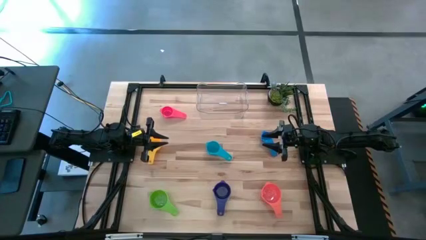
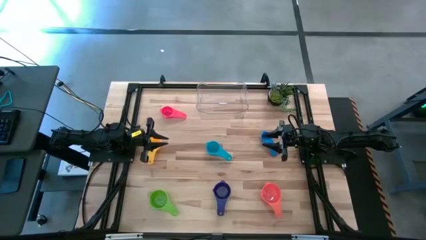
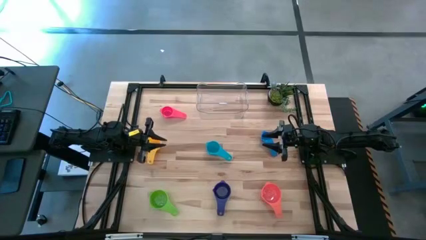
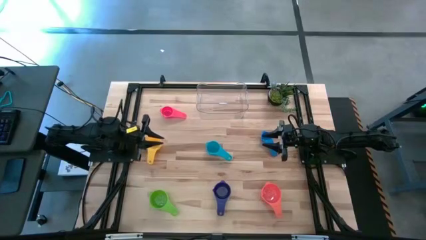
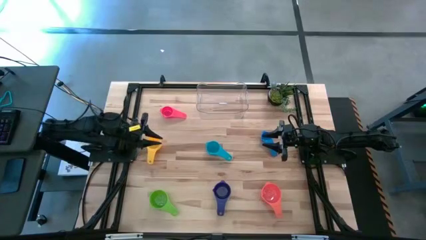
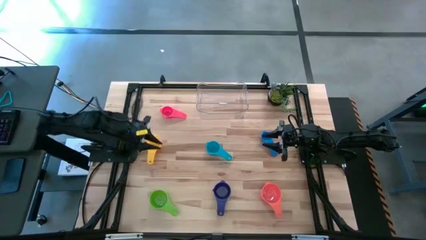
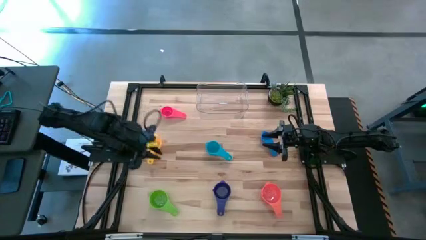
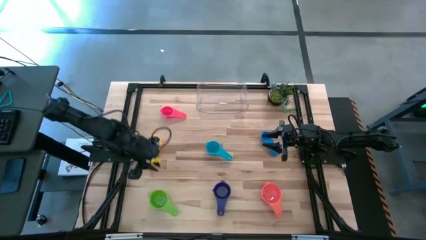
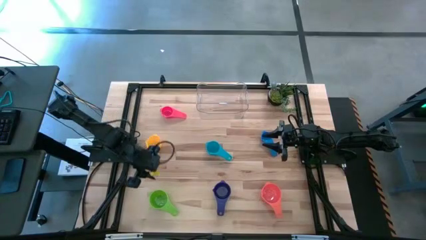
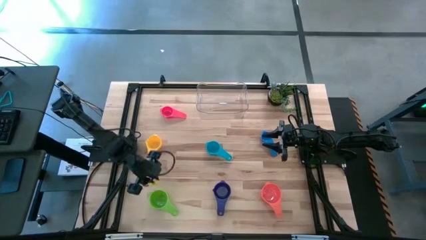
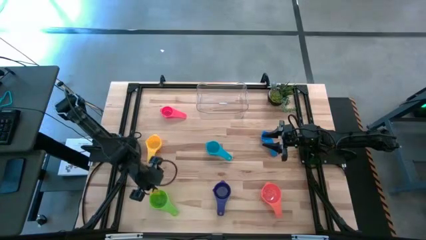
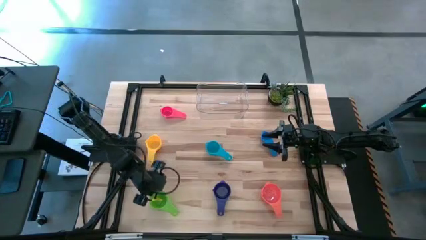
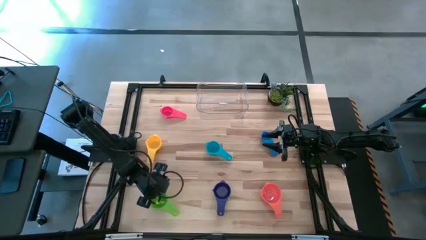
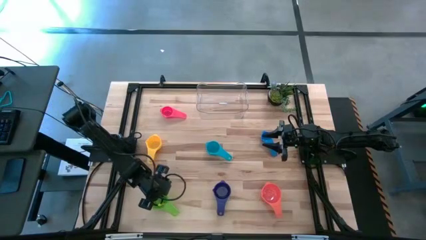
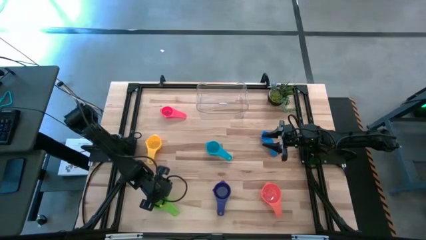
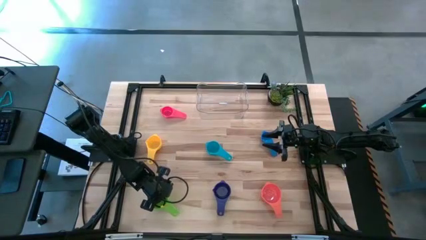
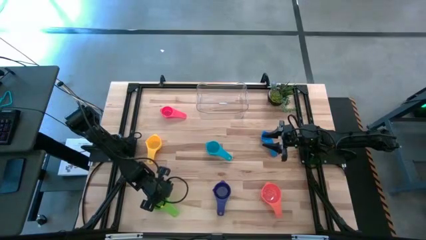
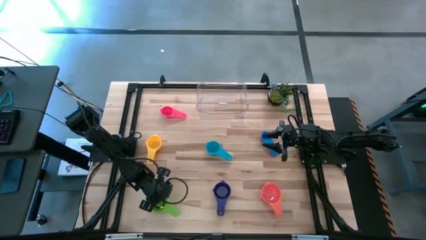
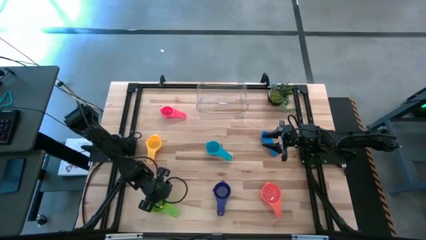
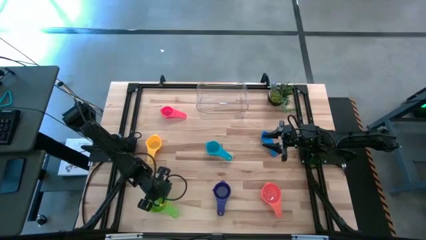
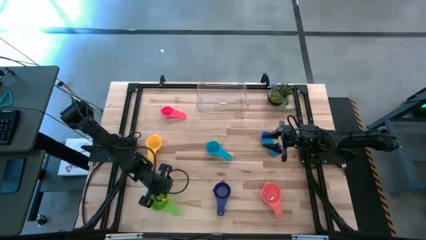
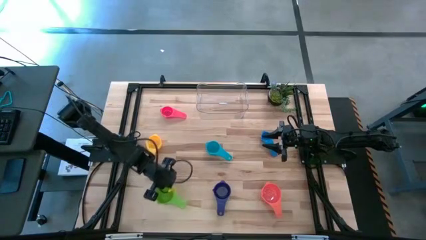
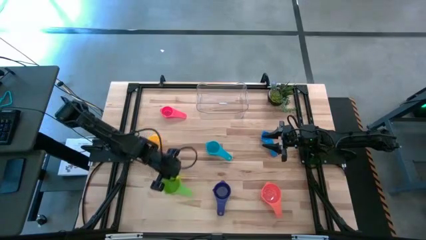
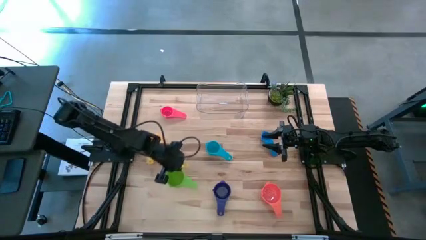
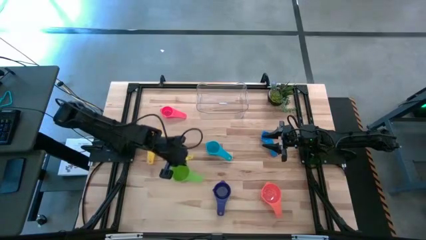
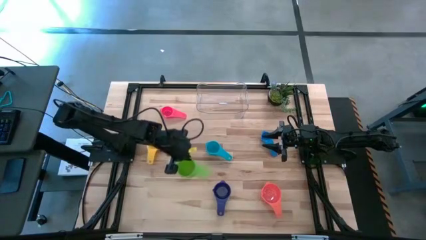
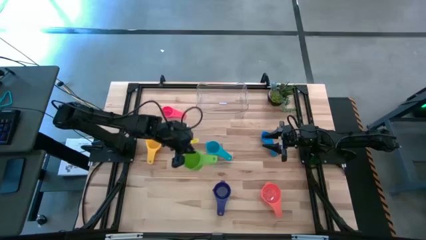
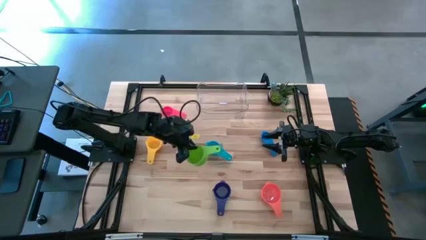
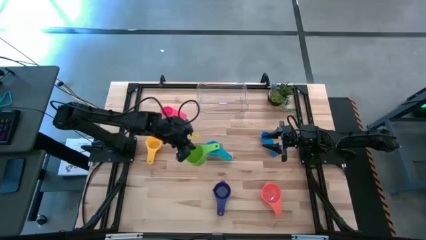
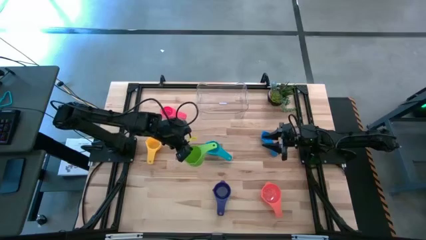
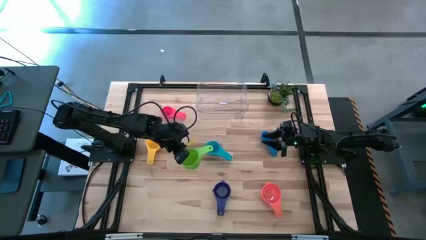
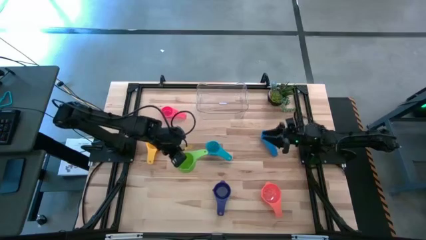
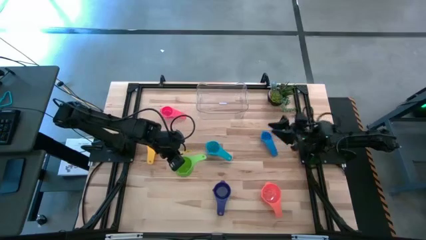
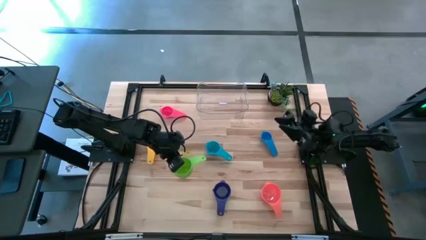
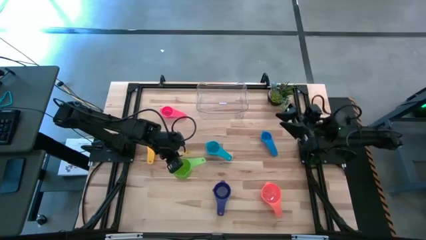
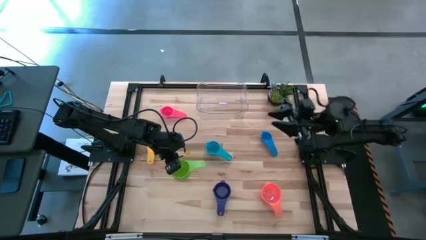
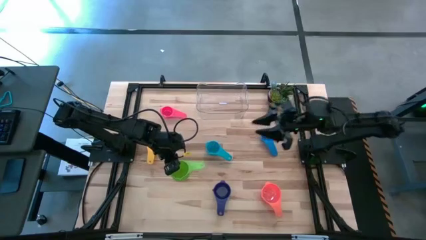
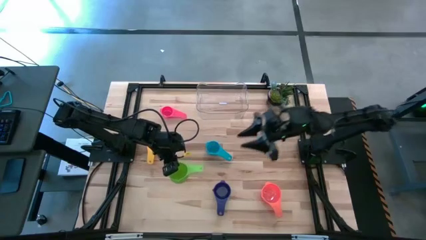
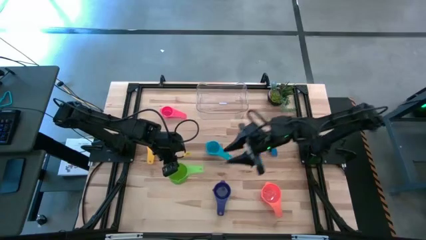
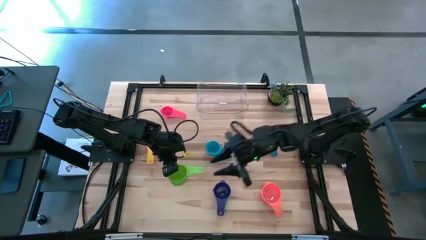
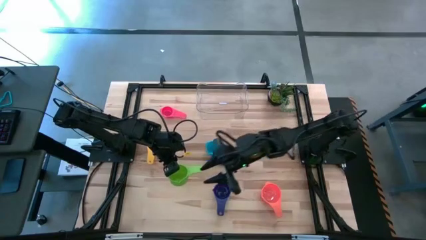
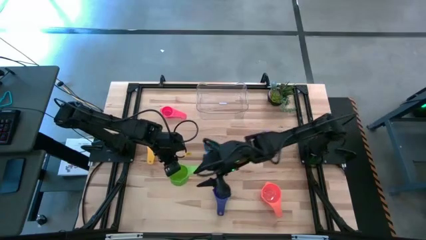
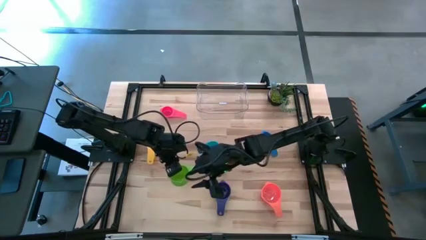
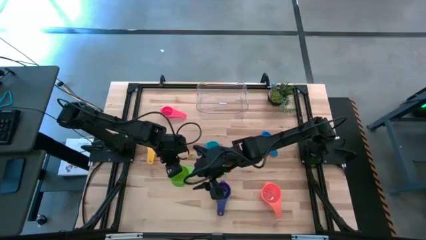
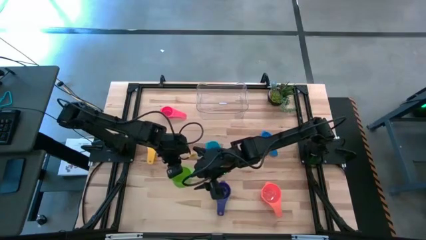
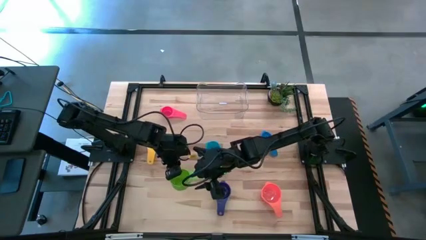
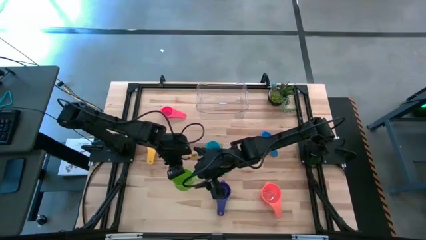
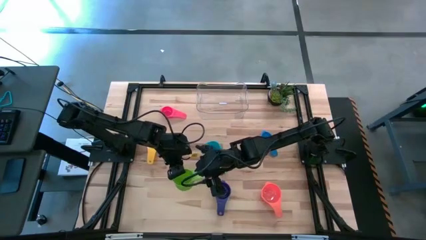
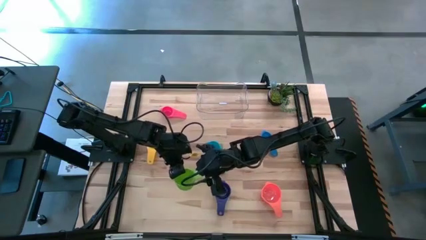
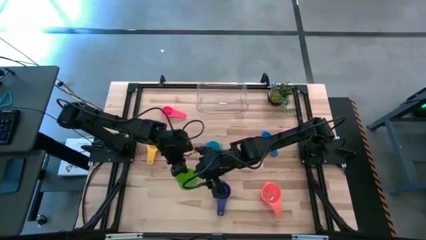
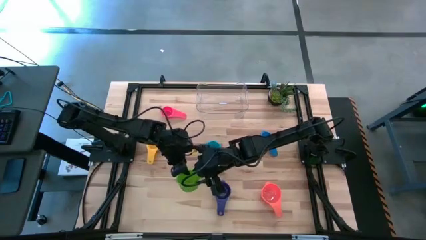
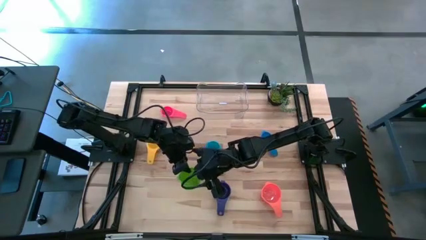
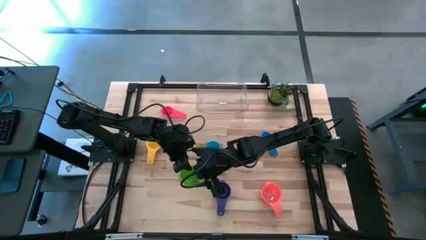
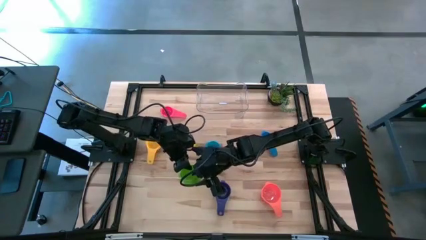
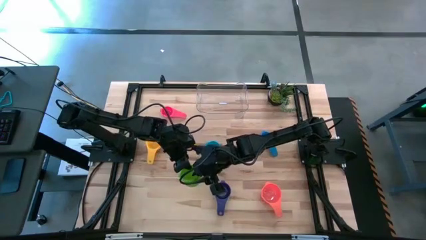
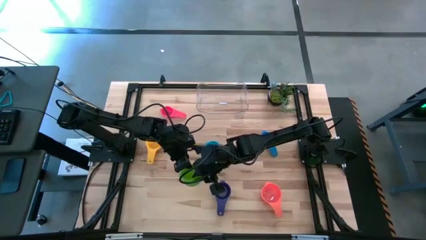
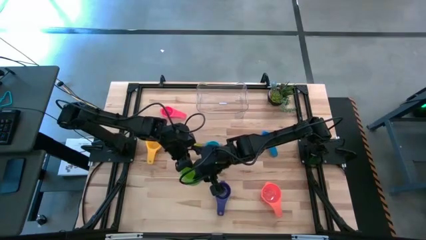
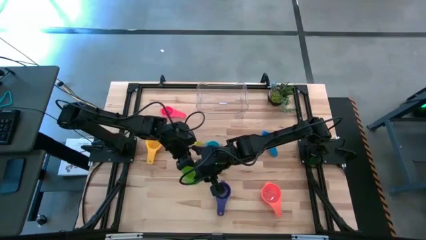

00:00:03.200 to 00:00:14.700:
Task: Nest measuring cups in basket
Stack the green measuring cup on top of the orange measuring cup

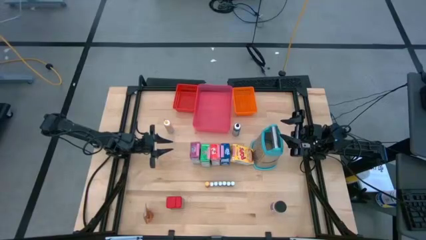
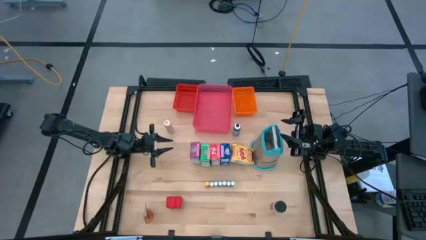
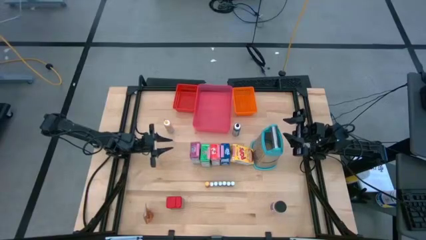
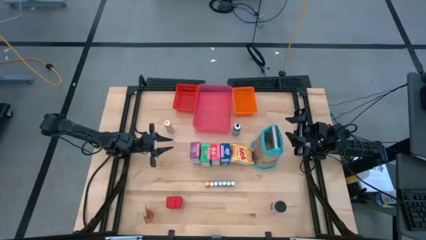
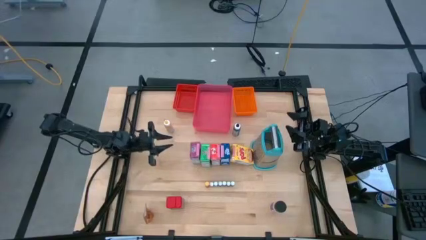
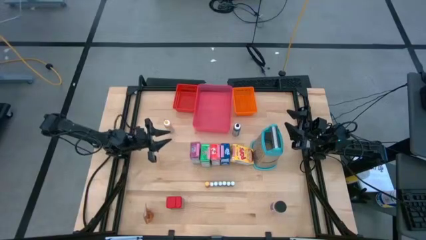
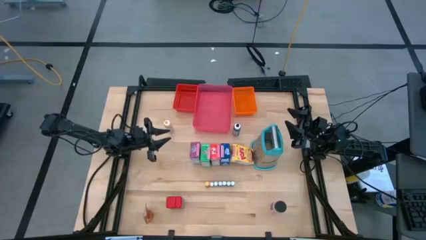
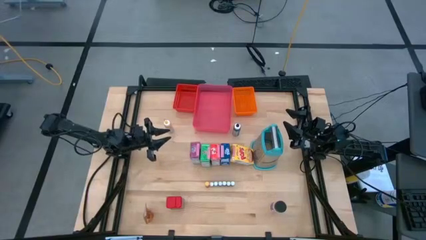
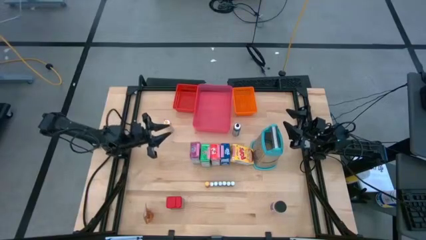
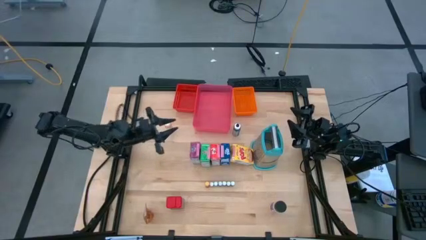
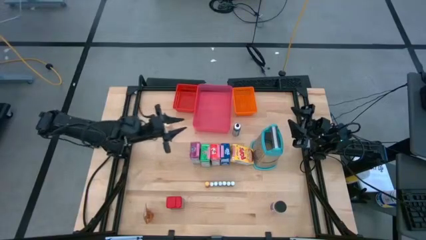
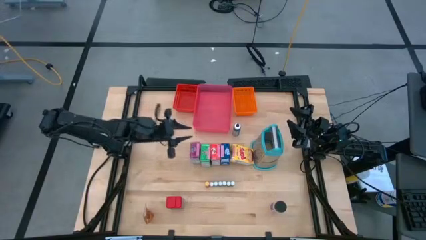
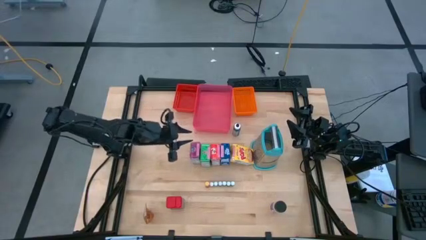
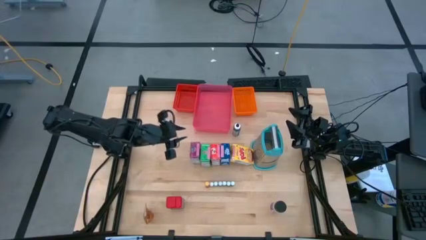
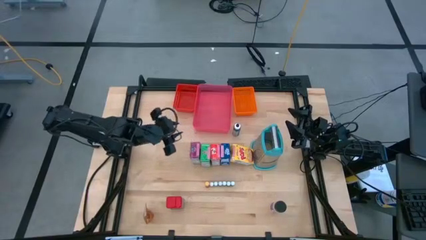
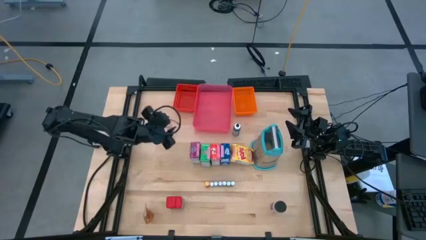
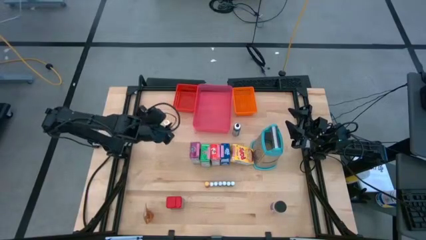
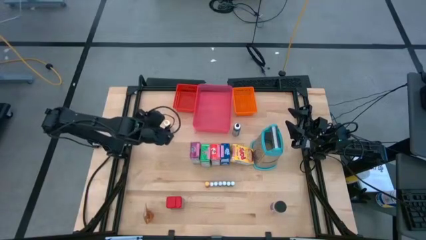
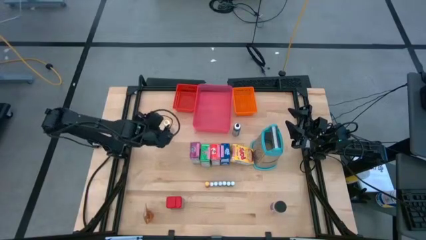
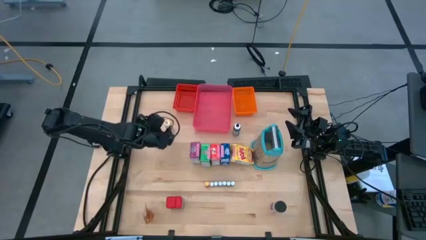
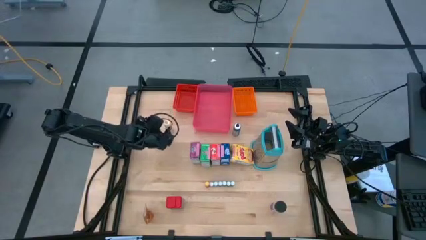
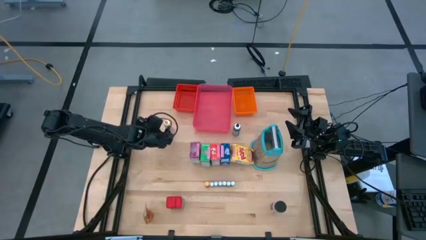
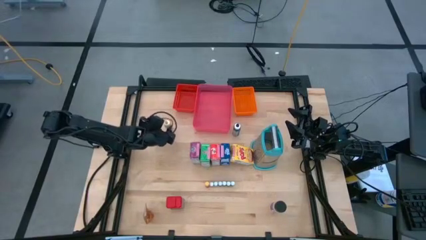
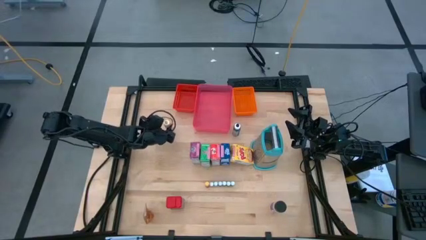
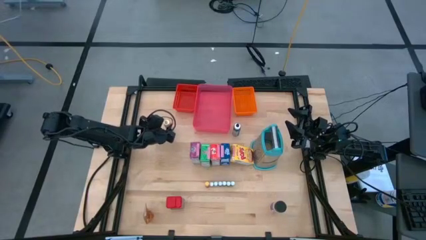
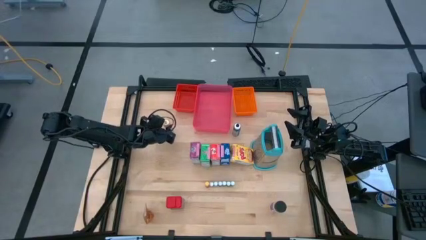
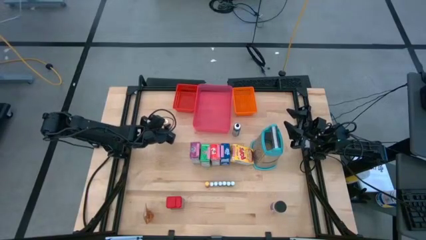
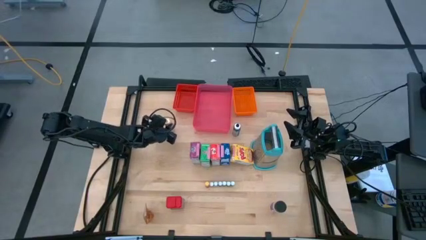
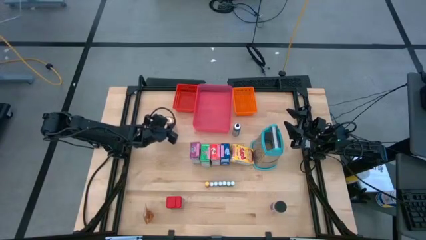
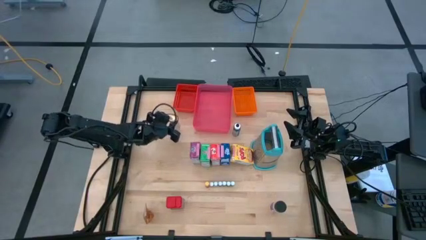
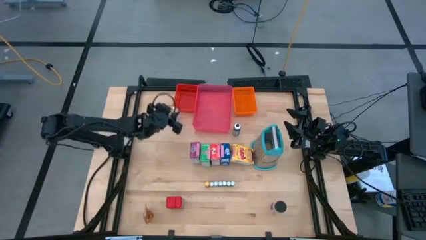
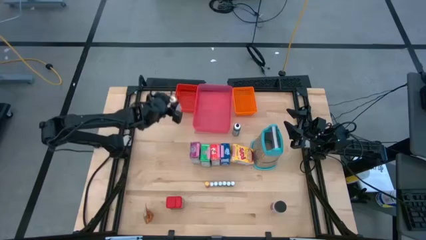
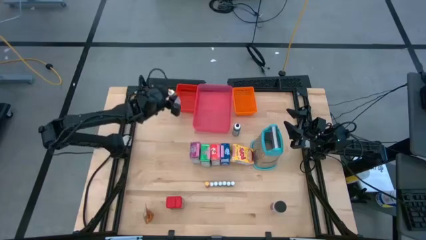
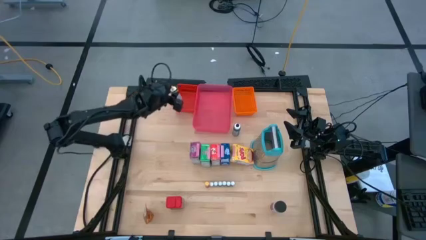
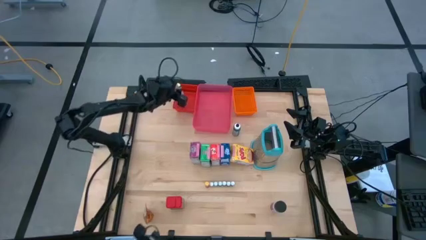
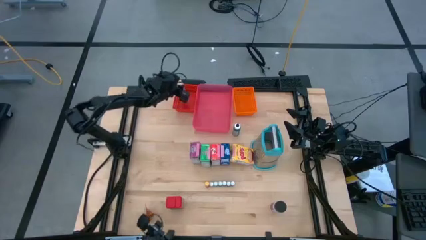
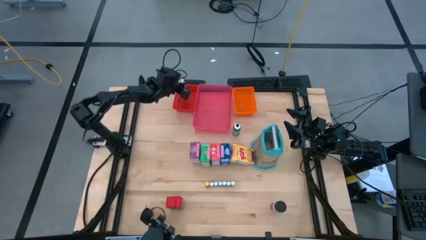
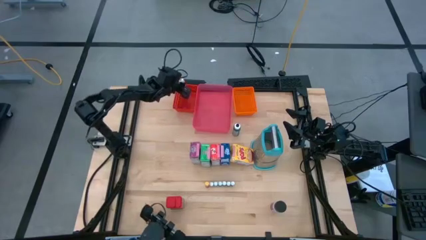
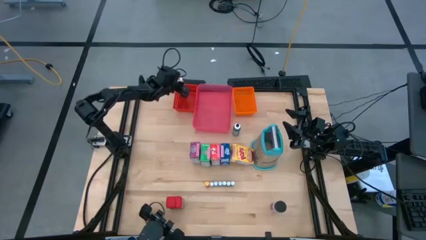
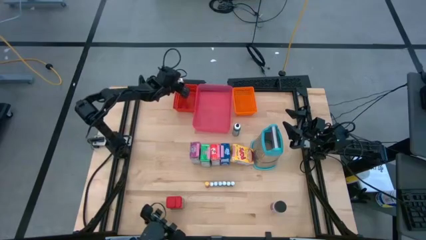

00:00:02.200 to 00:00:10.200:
Task: Pick & Place Kitchen Items
Put the large yellow food coloring bottle into the red bin
